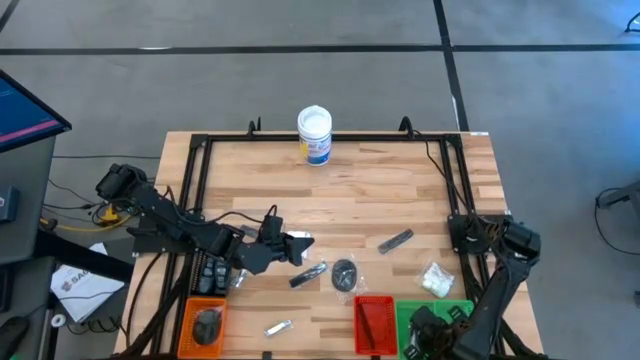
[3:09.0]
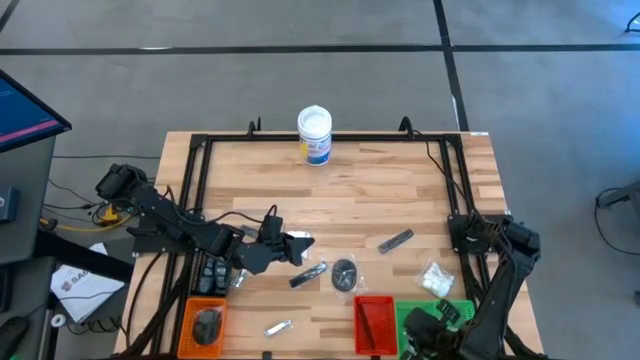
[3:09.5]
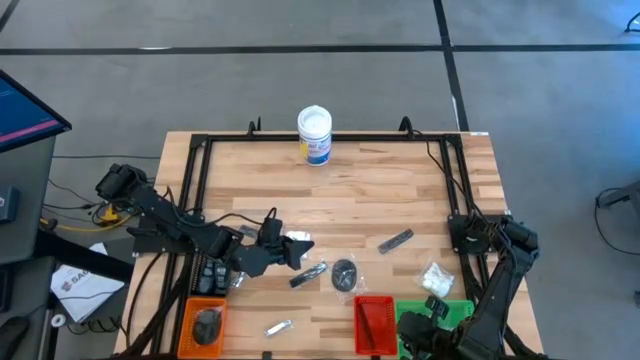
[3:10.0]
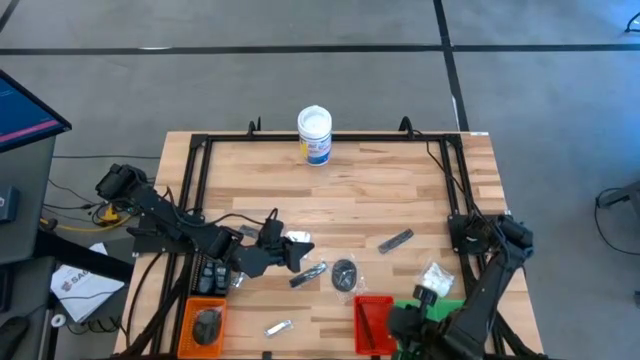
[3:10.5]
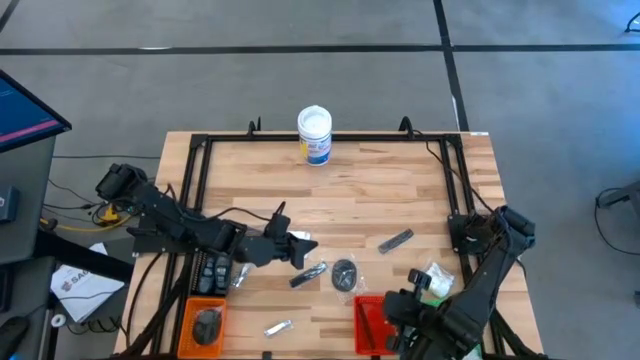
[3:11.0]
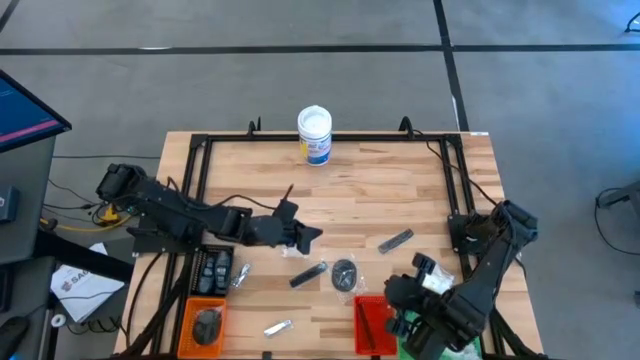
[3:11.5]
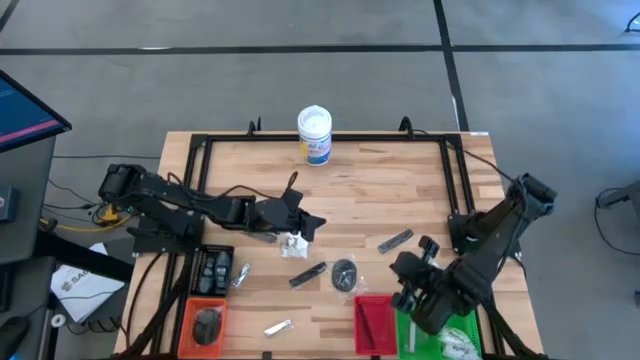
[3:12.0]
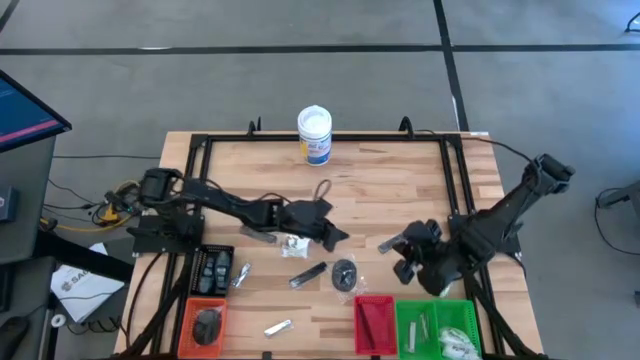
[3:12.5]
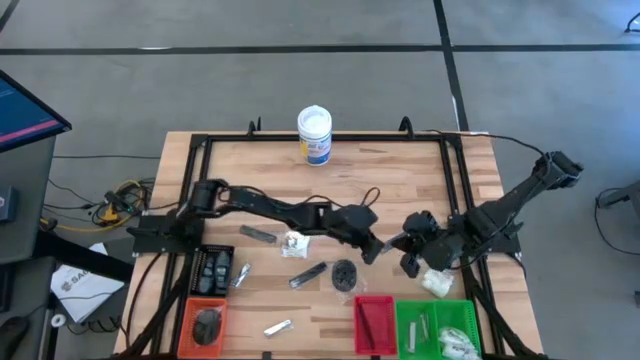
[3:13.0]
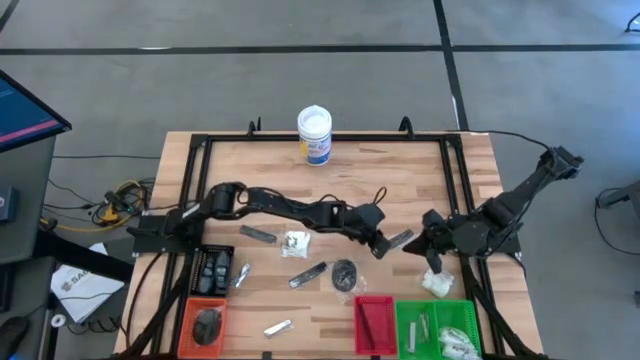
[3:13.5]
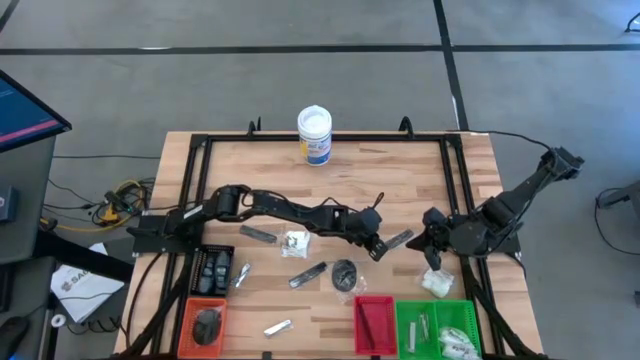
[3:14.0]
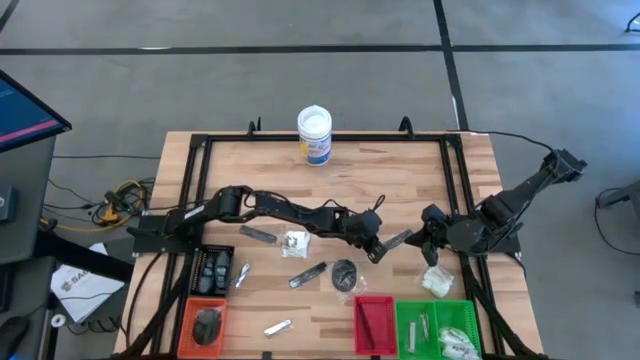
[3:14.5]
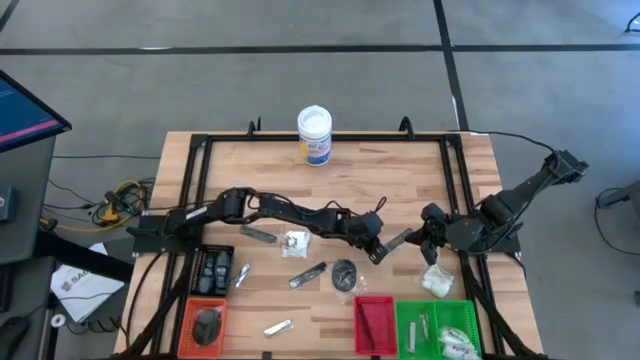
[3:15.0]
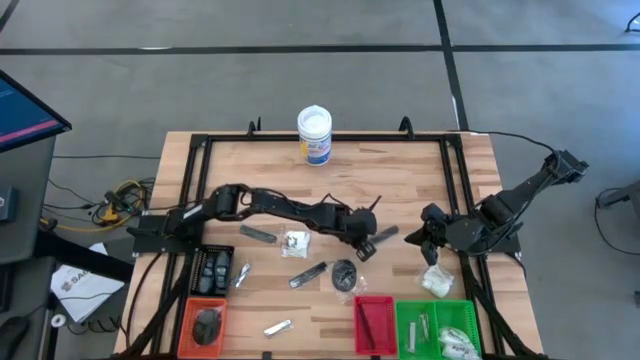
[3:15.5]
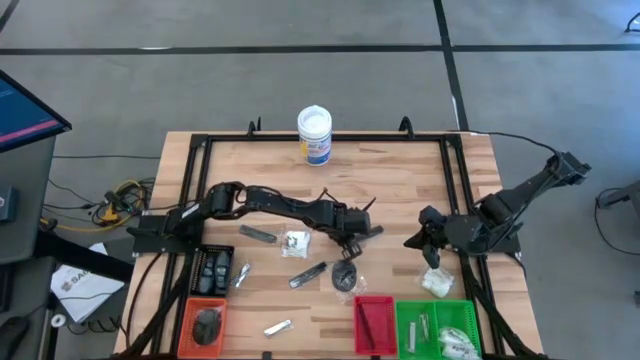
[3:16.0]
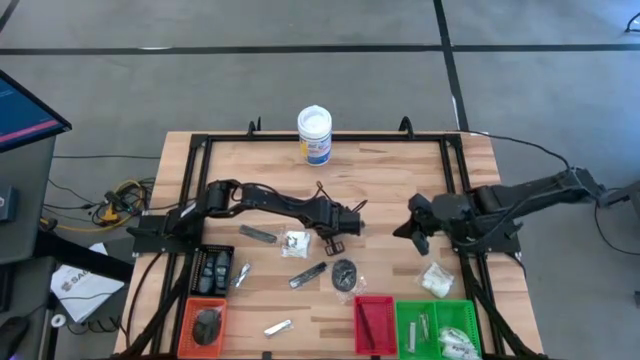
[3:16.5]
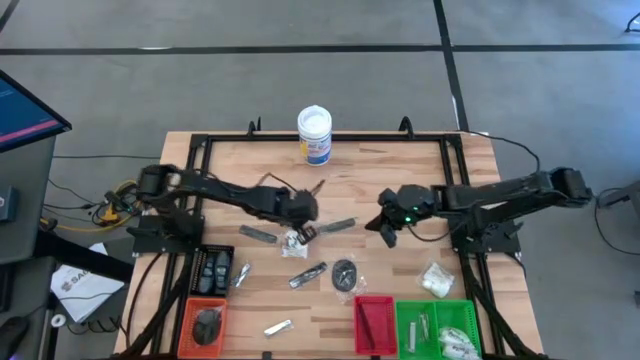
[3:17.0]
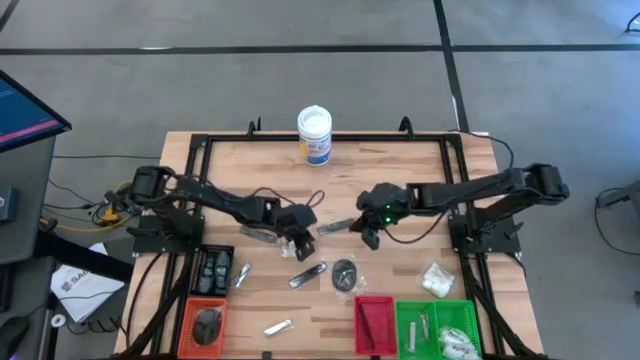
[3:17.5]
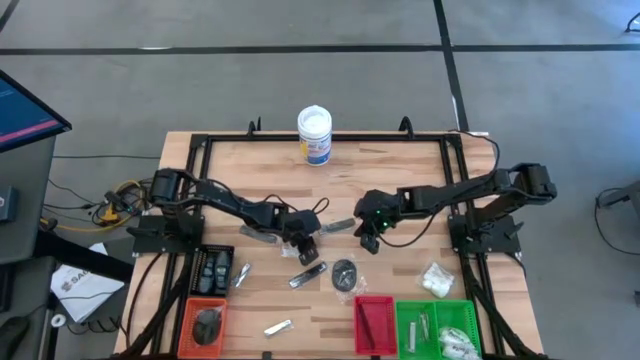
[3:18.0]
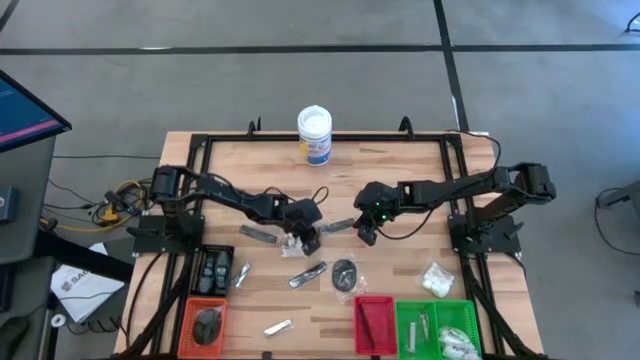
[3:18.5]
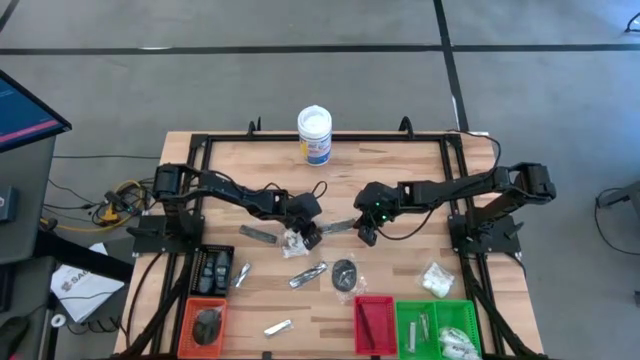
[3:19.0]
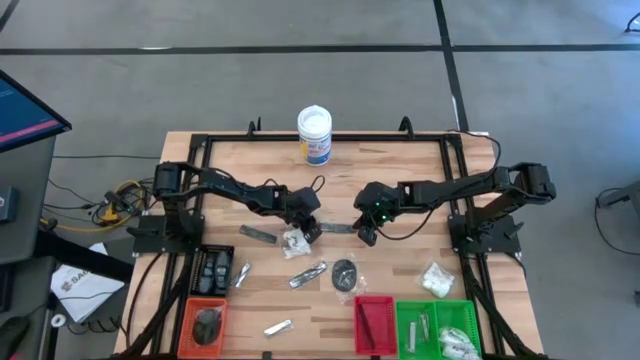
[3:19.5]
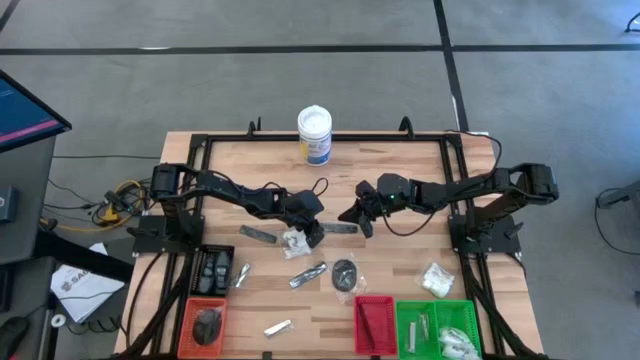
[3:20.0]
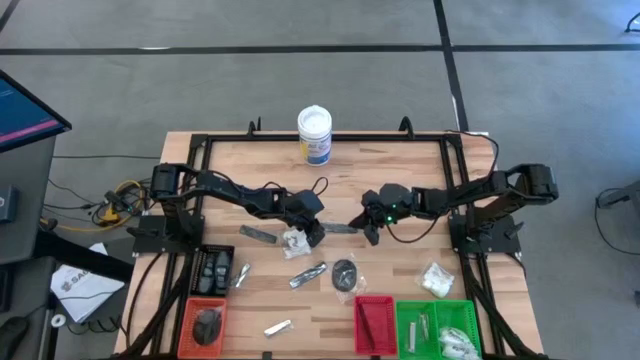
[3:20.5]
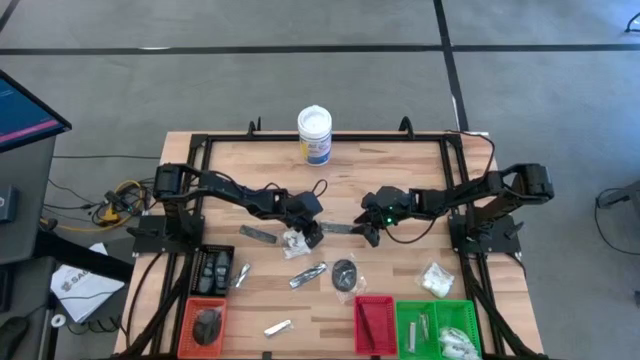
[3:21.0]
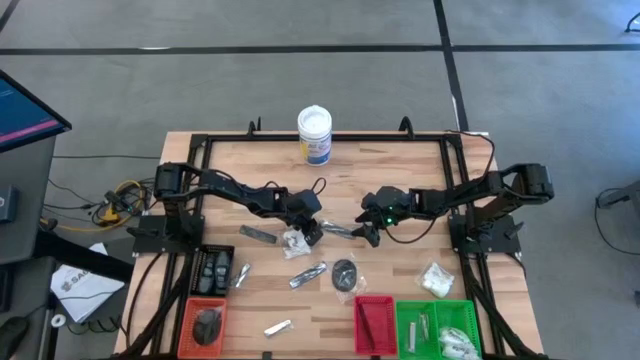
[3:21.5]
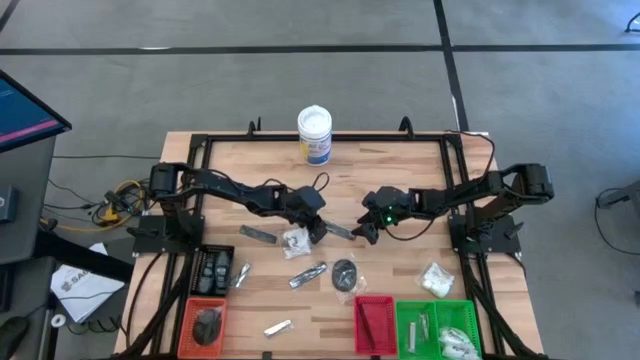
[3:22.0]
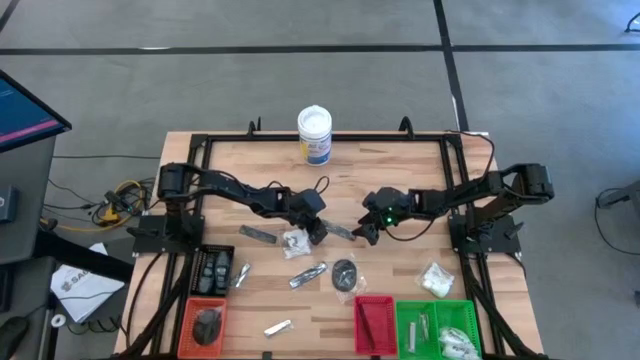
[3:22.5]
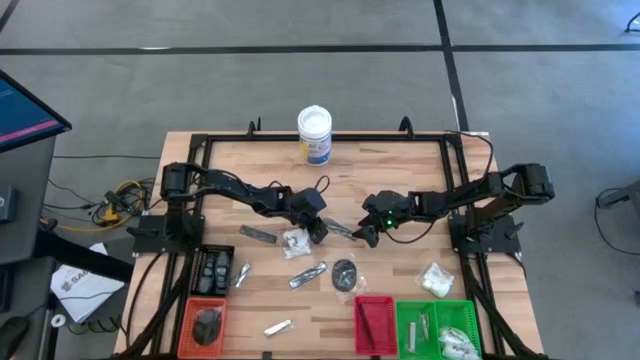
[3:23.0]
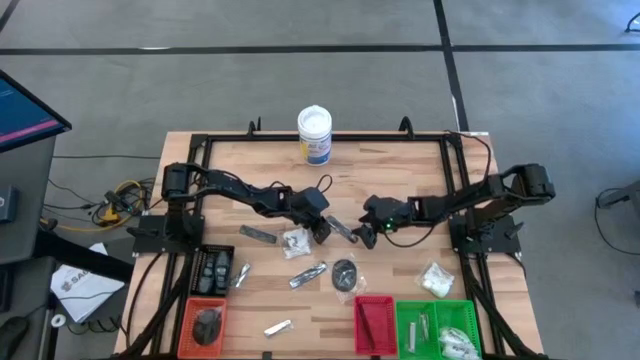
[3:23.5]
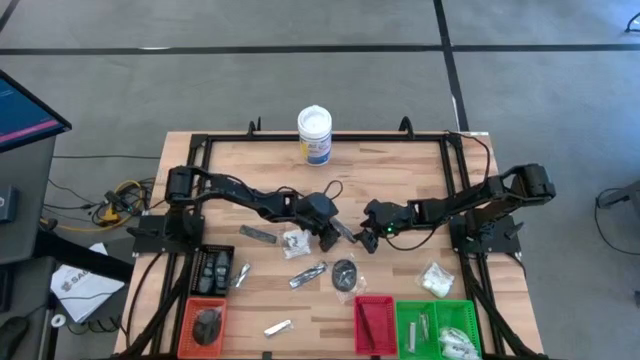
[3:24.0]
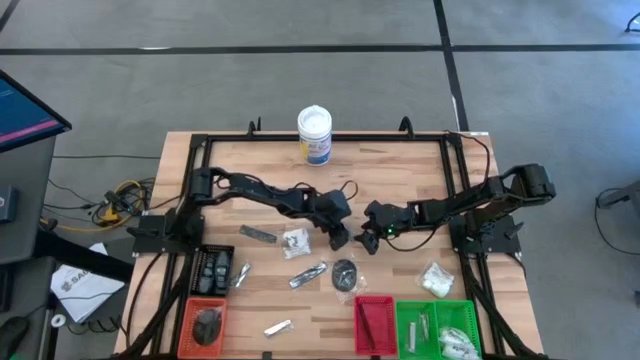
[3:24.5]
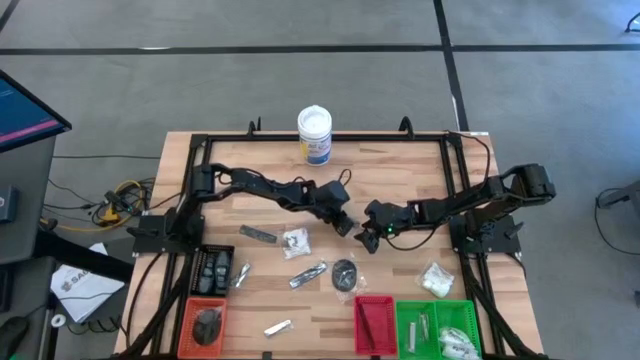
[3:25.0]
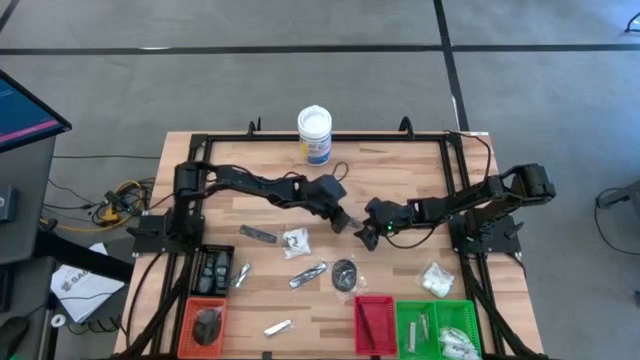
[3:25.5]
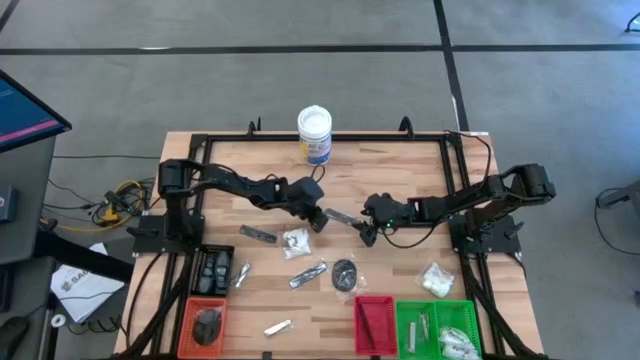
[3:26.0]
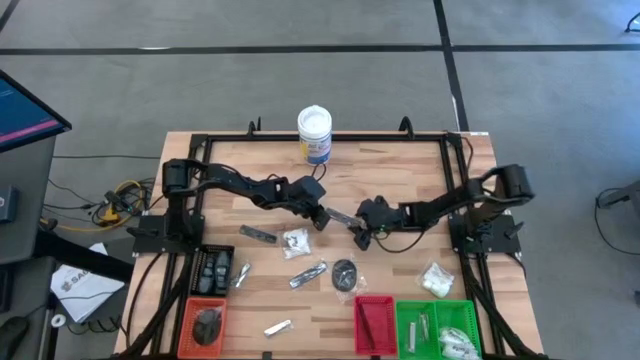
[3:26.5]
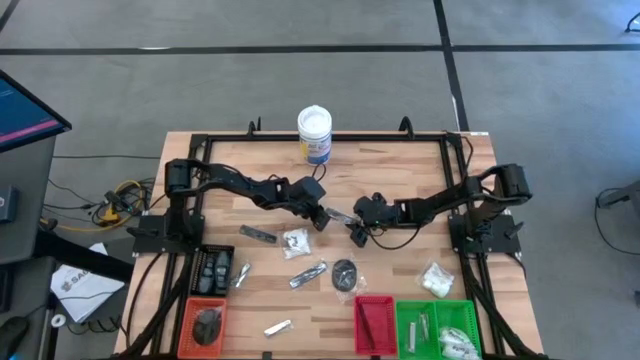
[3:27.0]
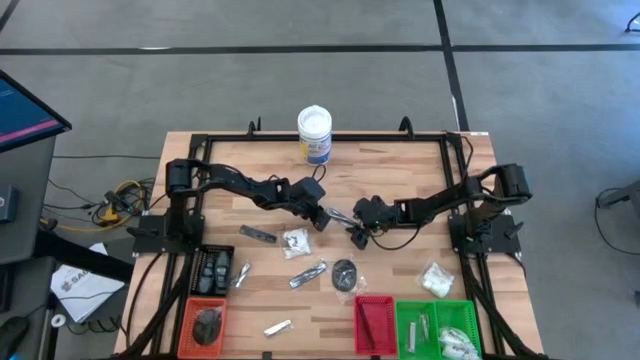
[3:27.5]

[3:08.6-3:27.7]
Task: Pick & Place Travel size toiletries
Put the black comb into the red bin

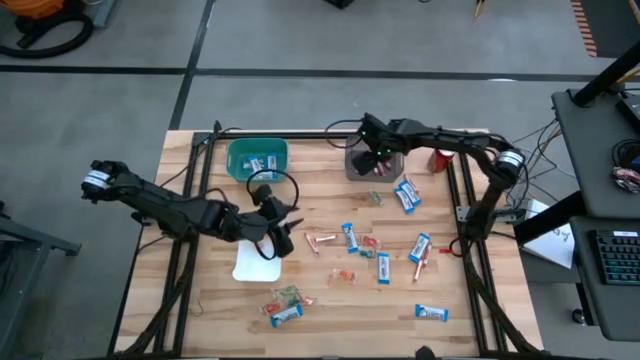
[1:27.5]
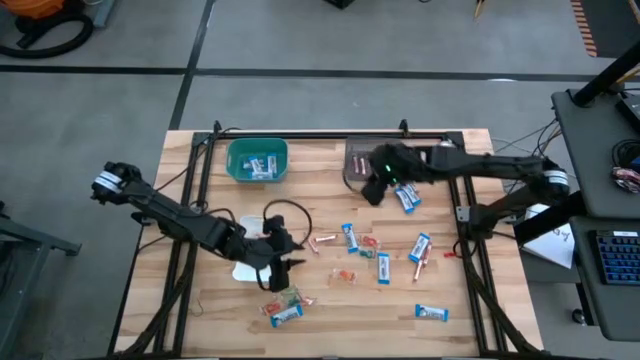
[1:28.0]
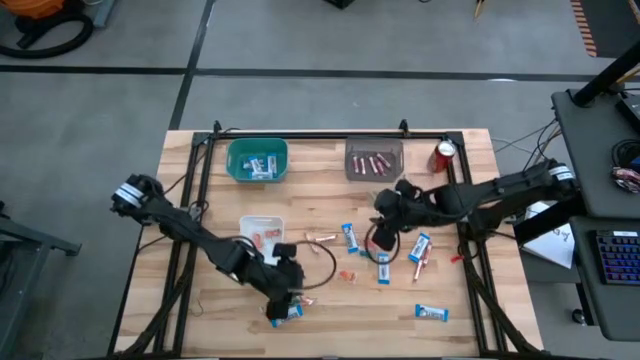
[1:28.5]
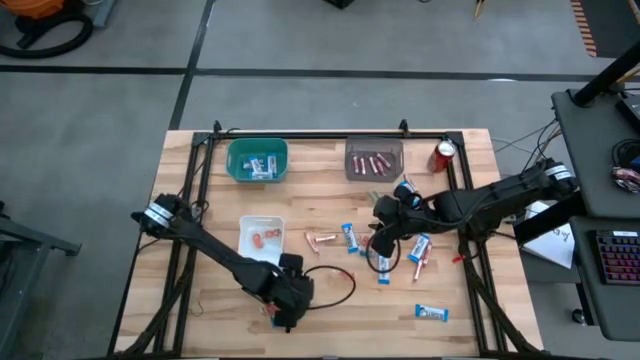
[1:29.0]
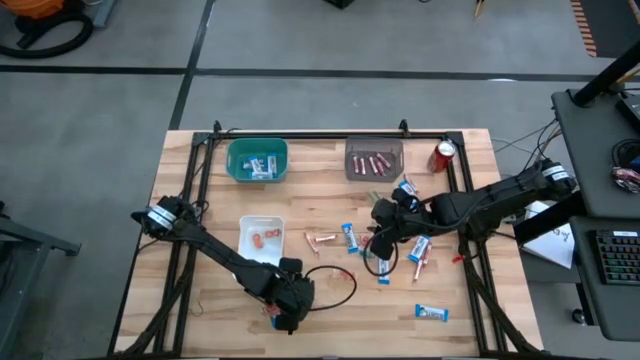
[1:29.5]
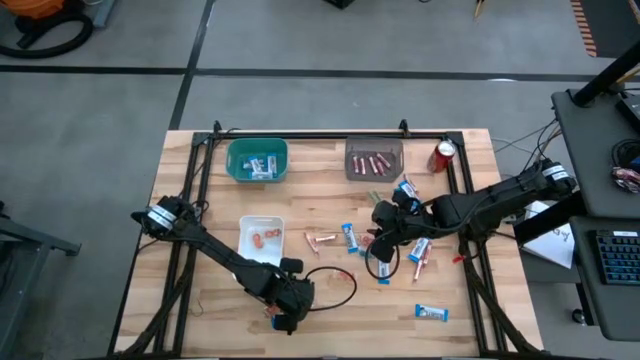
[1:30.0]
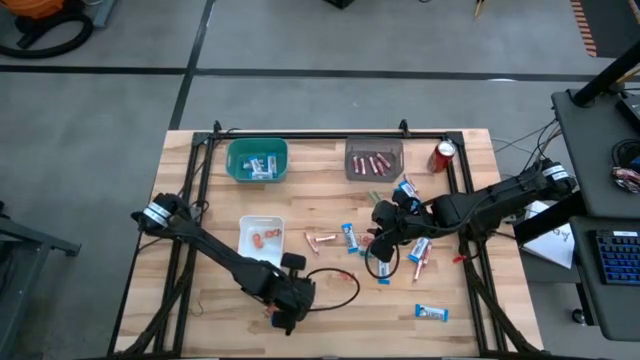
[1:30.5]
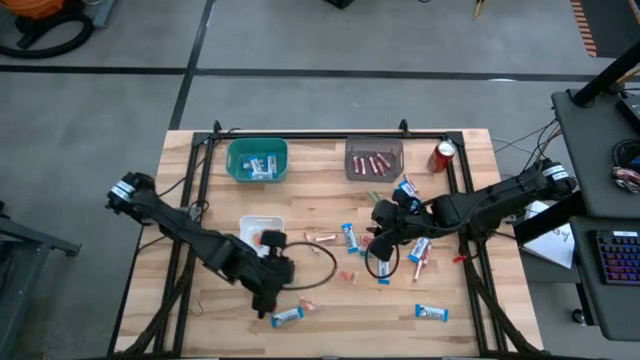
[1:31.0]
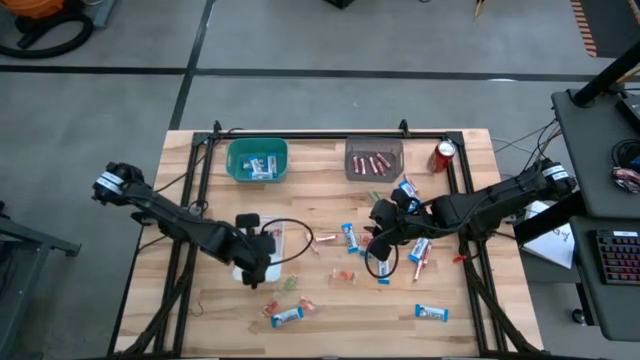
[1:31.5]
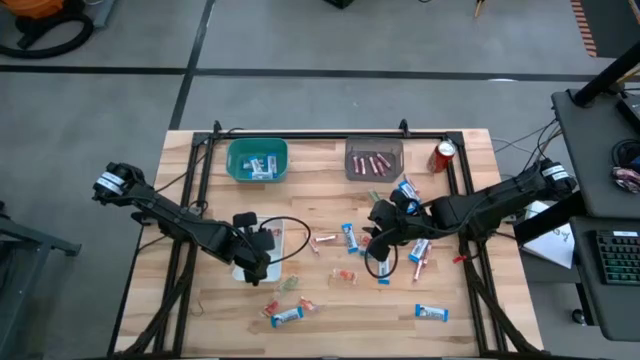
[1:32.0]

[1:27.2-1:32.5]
Task: Sort candy
Put the blue gummy candy into the white bin
